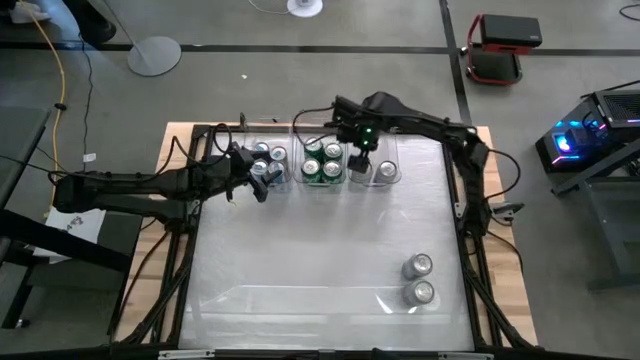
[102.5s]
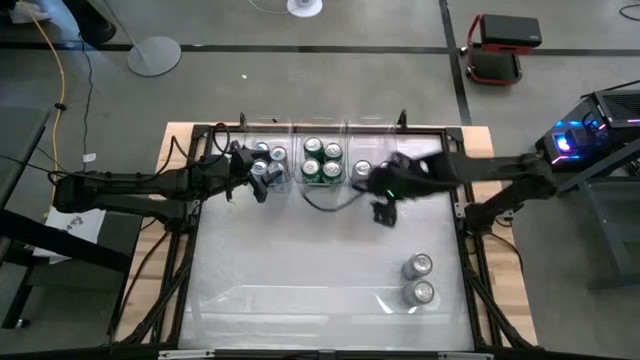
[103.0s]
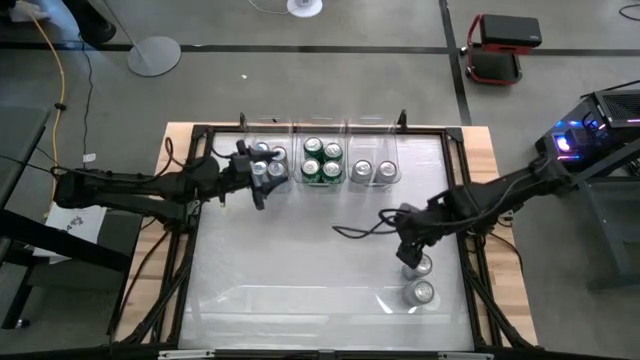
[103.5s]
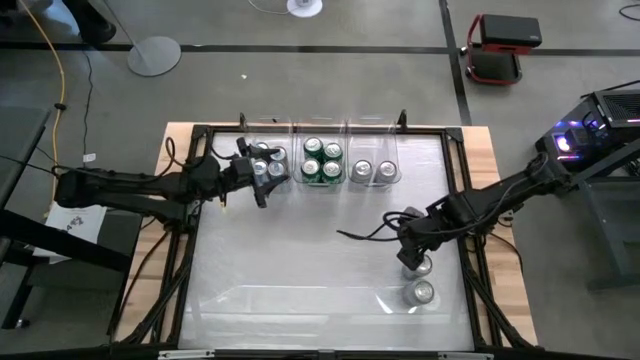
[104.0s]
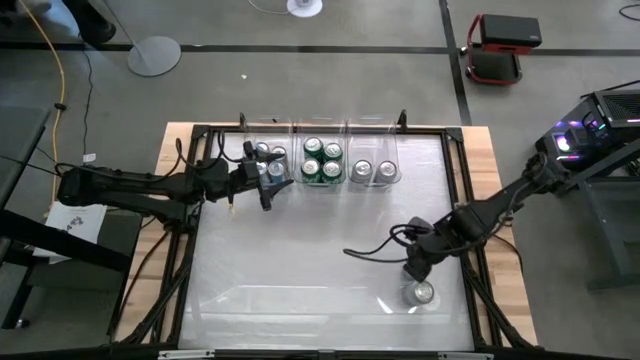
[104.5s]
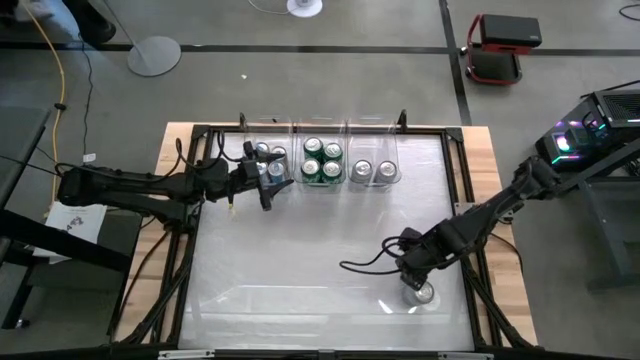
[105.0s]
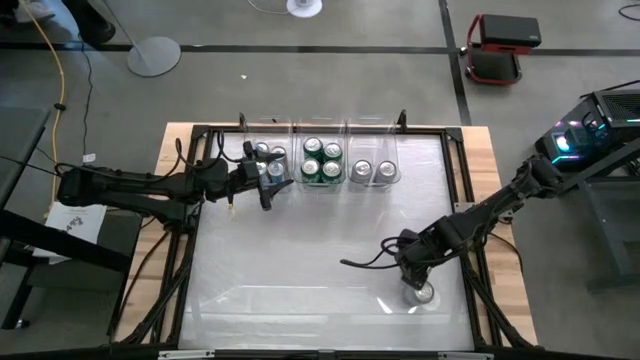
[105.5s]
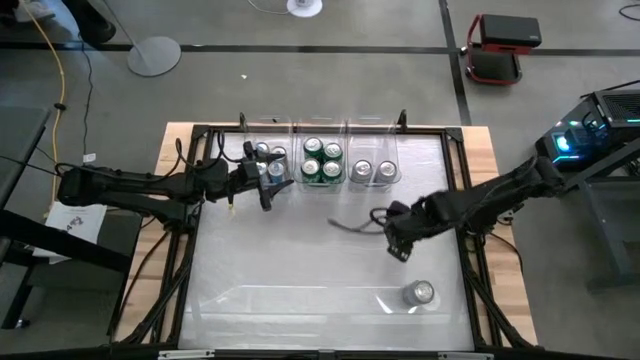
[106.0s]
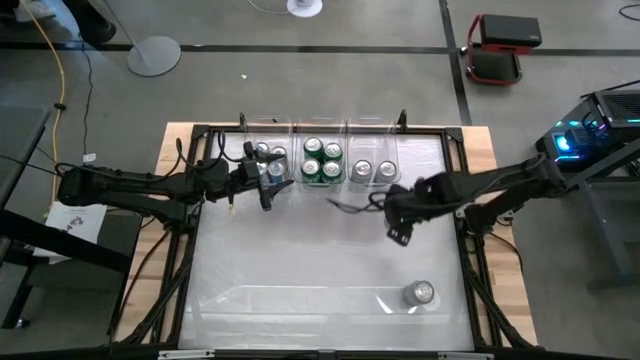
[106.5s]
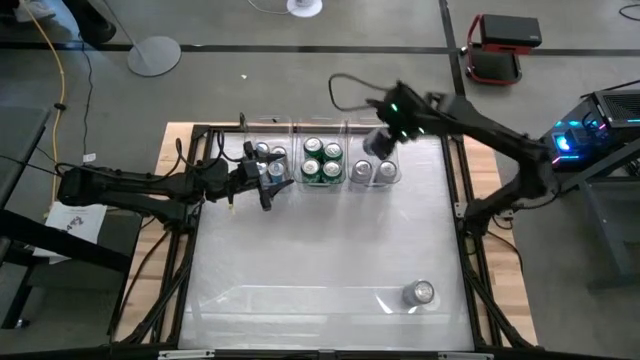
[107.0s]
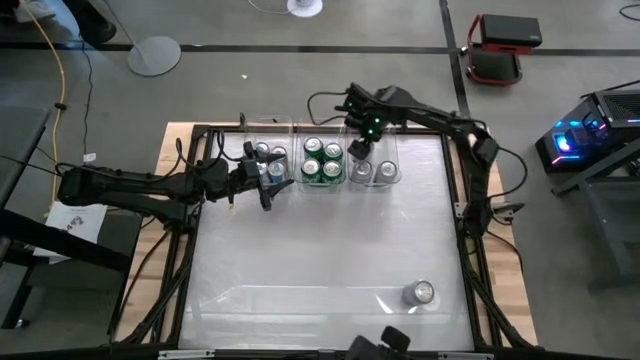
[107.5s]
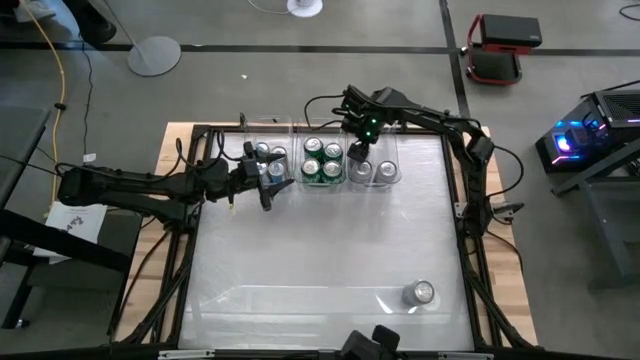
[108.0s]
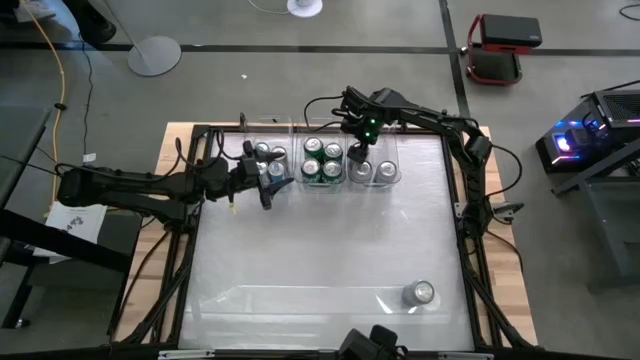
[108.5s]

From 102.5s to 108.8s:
Task: Sort soda cans
Put the top blue-white soda can into the right transparent bin

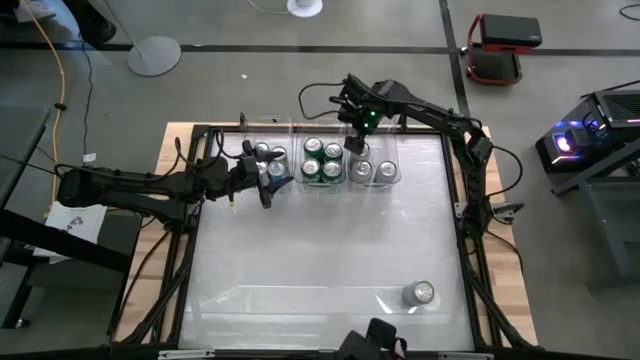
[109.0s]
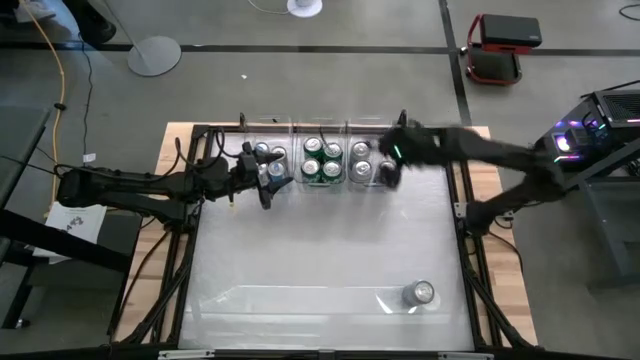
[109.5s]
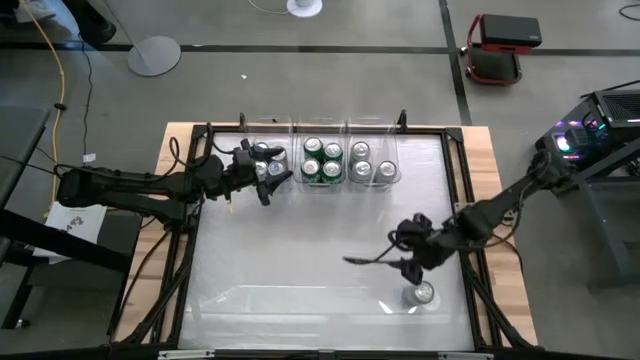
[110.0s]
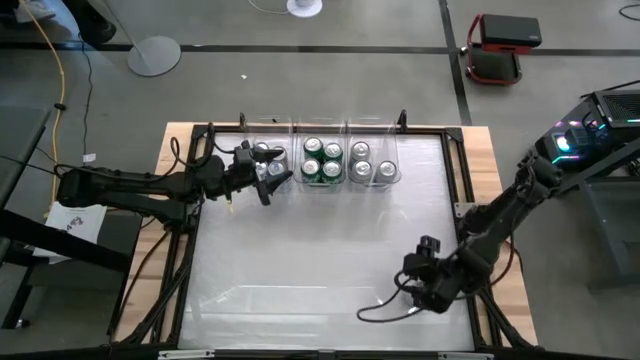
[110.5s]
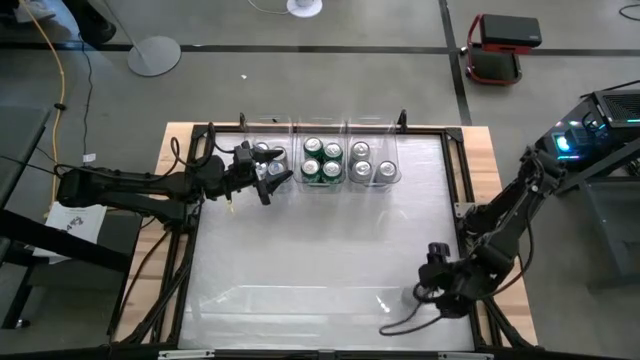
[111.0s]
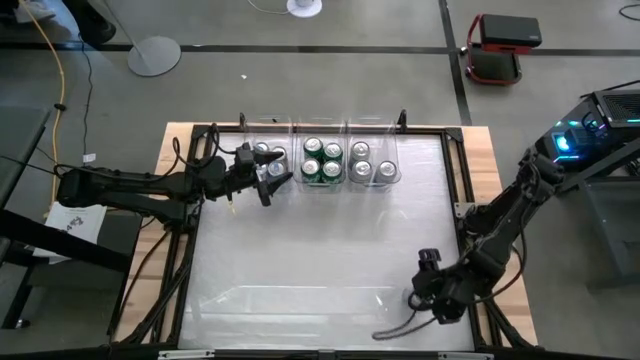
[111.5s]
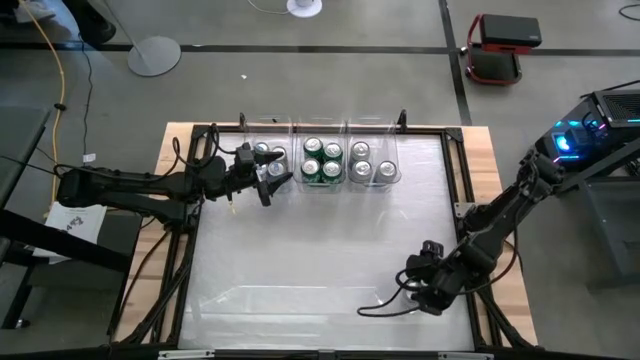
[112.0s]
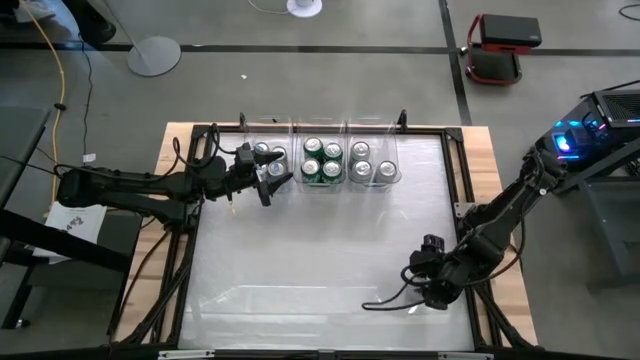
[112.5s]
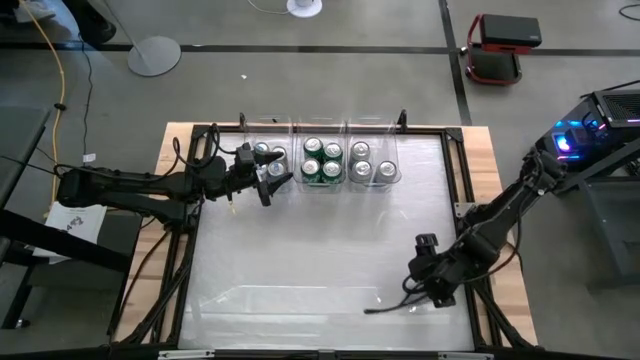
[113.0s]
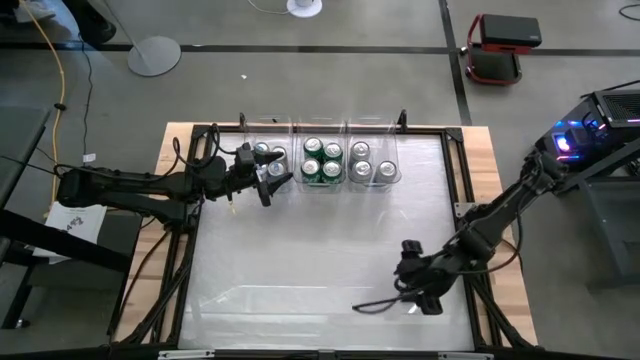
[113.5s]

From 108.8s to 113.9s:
Put the blue-white soda can into the right transparent bin

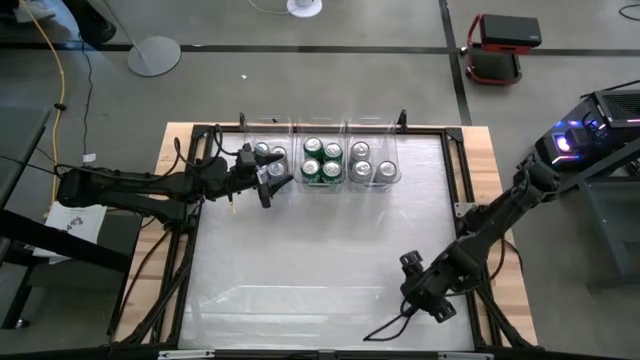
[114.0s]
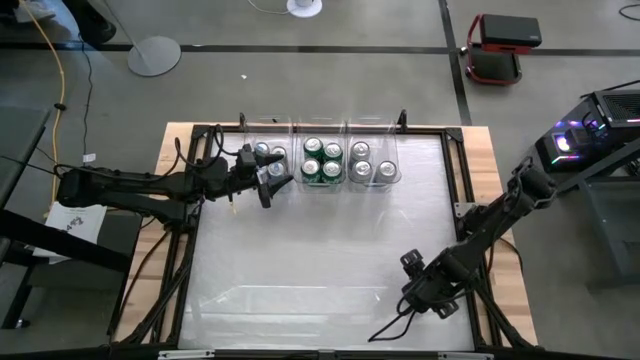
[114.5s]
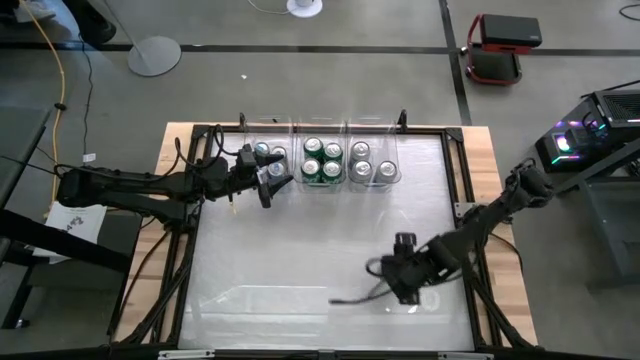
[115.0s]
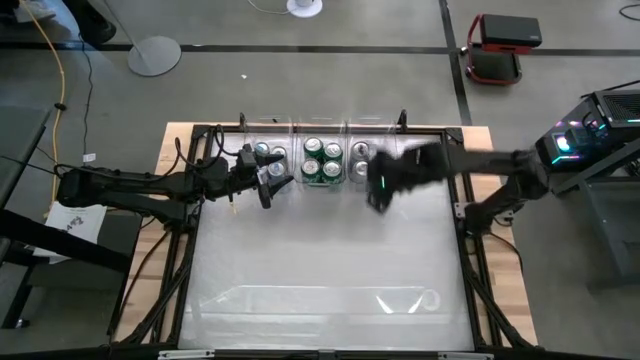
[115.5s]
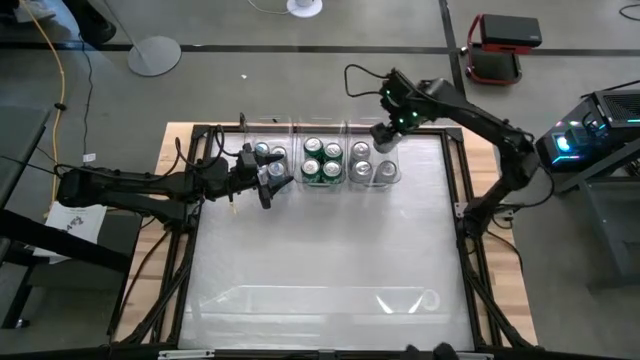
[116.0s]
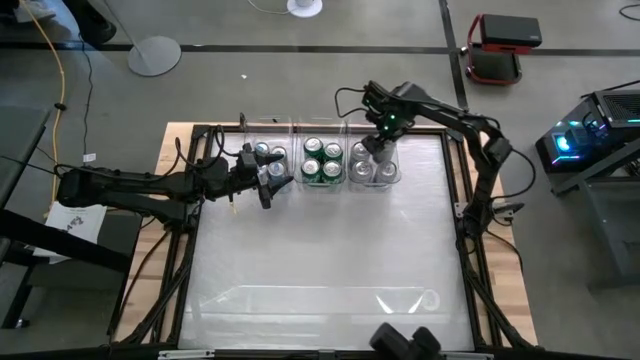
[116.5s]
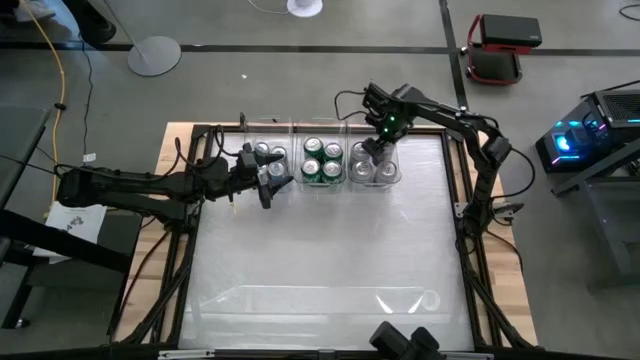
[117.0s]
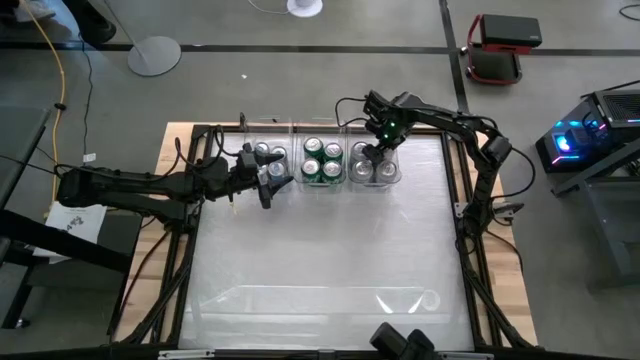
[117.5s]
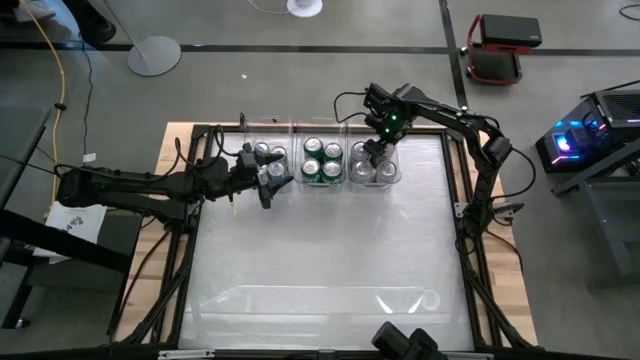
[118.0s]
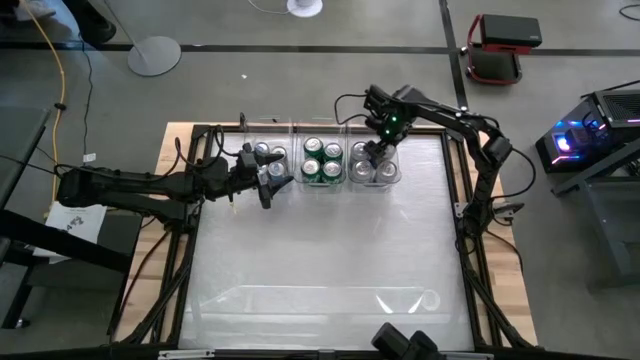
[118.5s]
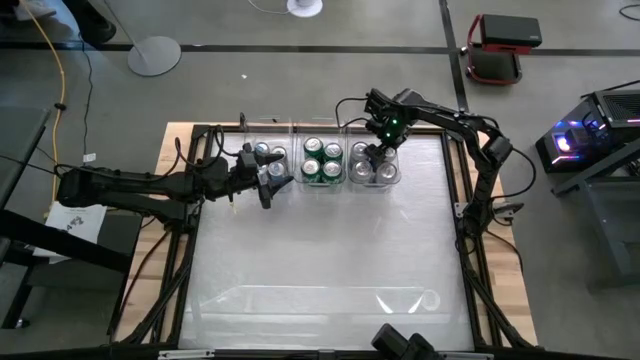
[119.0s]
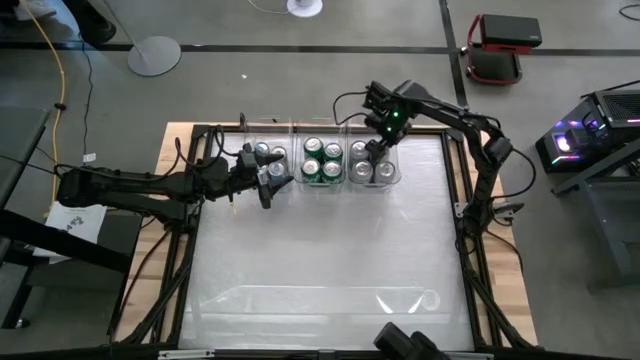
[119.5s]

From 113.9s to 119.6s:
Put the blue-white soda can into the right transparent bin

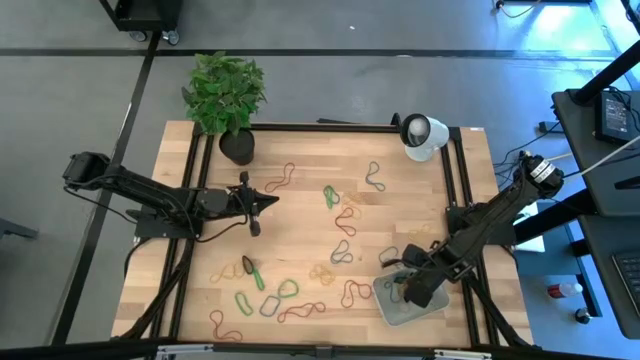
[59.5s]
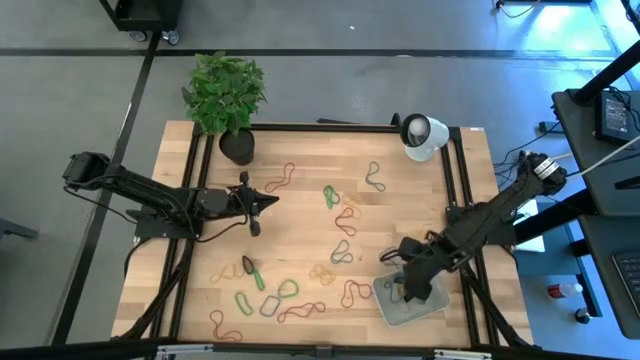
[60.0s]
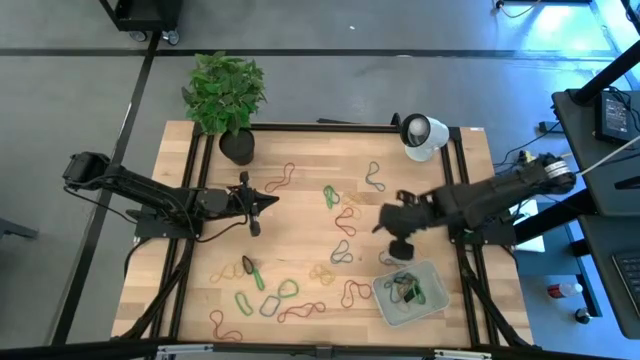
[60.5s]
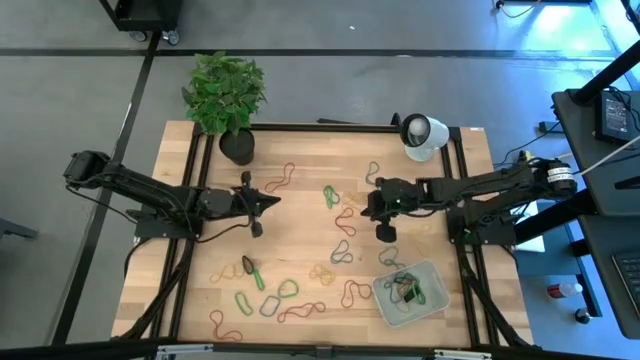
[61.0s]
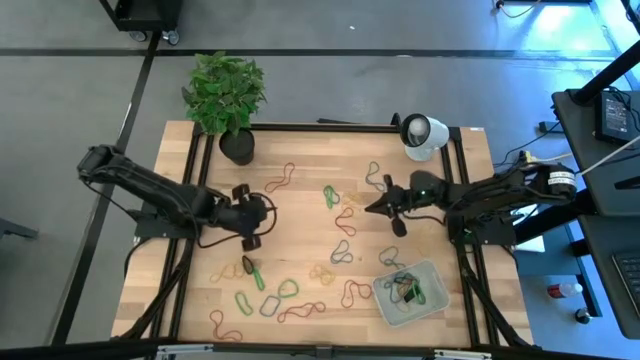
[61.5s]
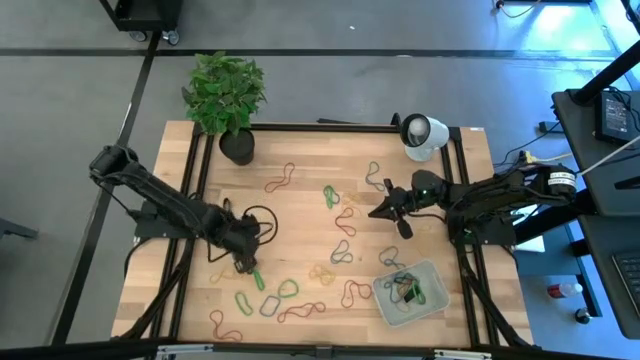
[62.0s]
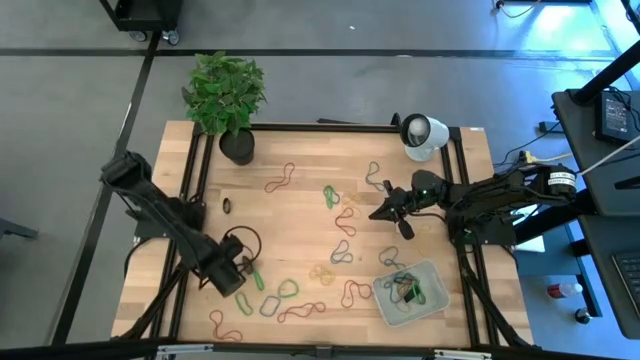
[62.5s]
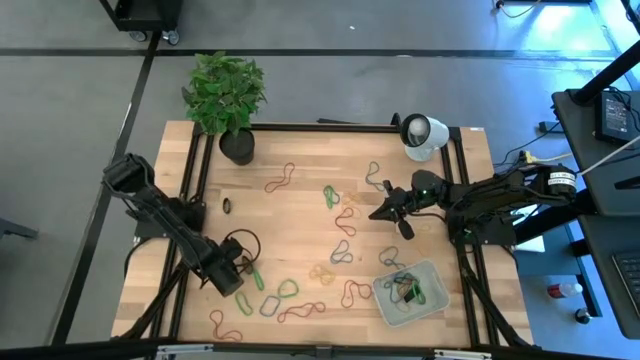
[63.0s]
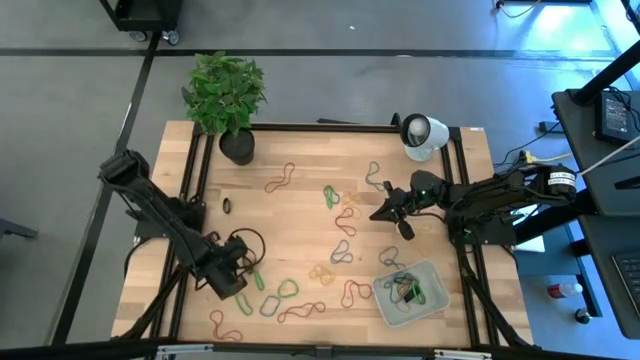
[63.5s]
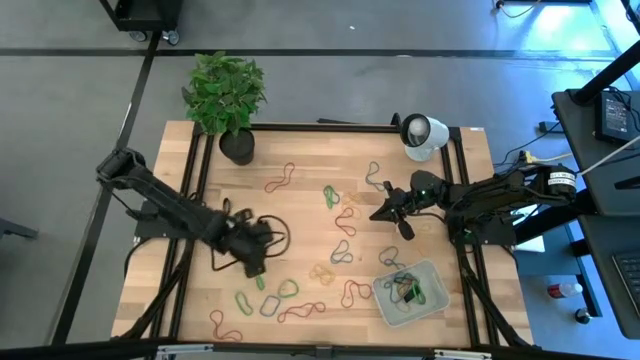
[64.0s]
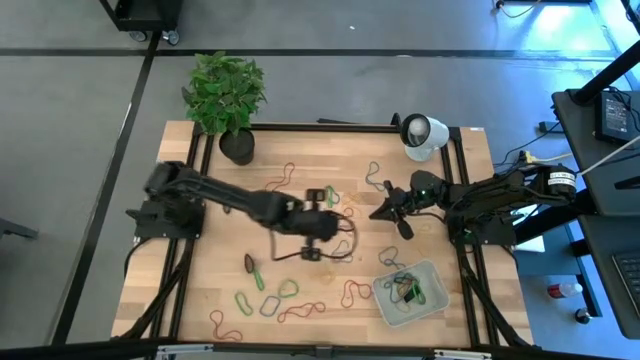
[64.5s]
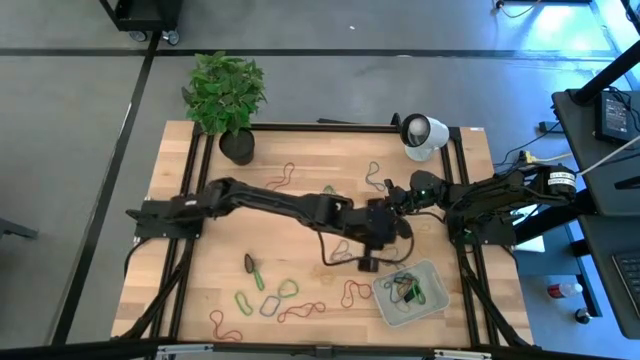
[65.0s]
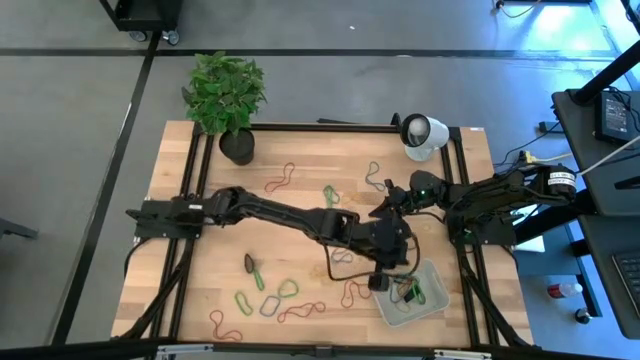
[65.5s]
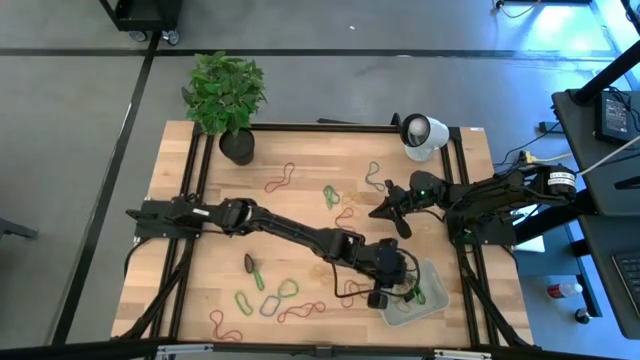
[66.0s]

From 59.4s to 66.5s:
Task: Pick and place rubber bands into bin
Put the yellow rubber band into the white bin
